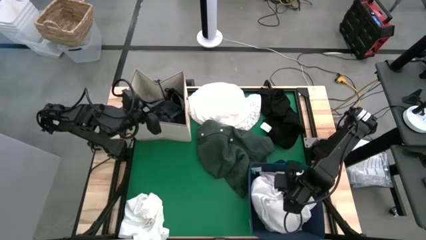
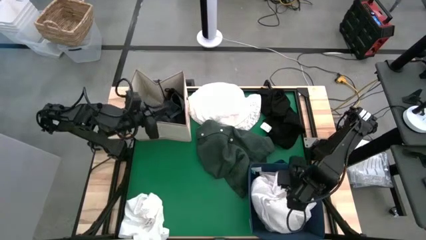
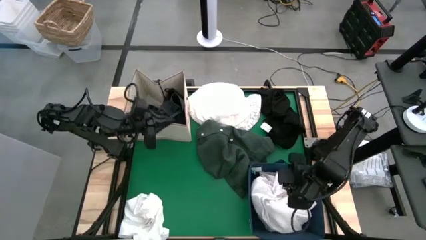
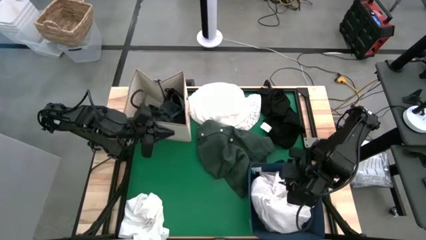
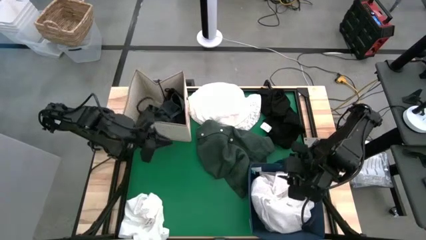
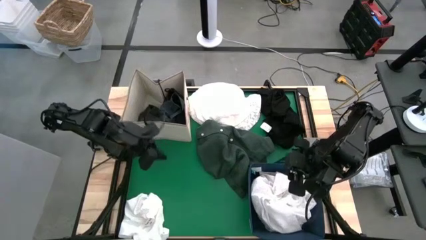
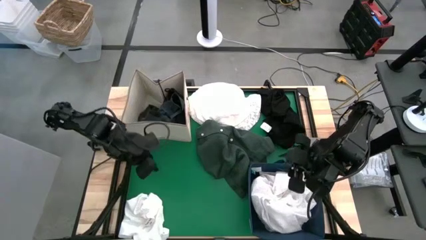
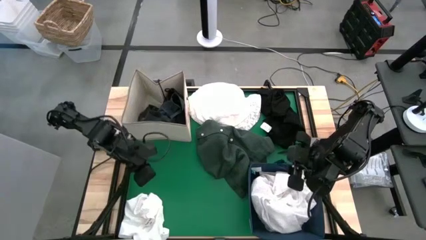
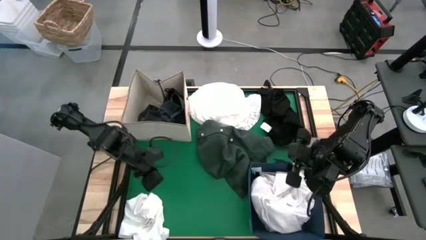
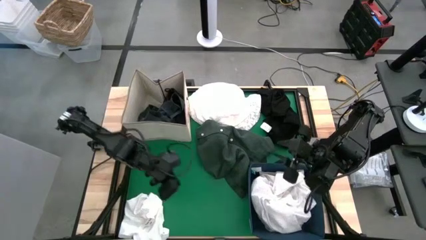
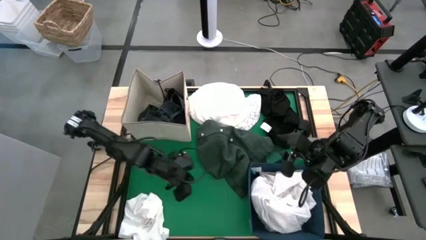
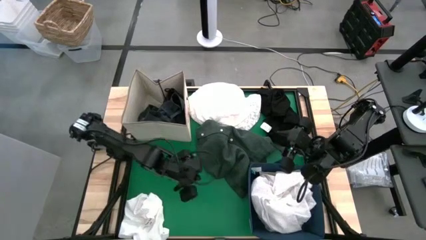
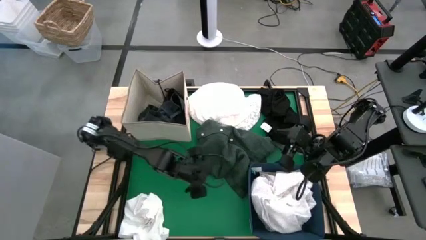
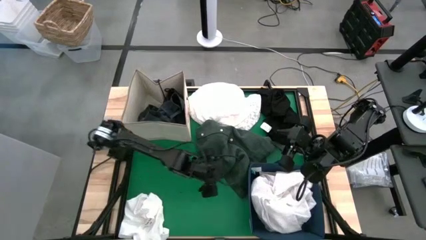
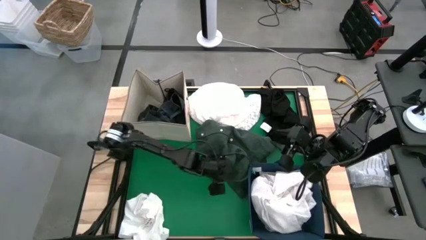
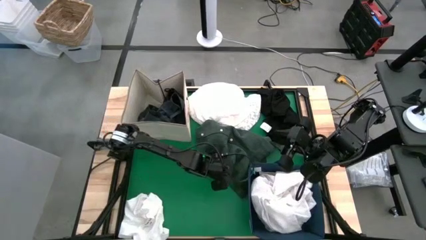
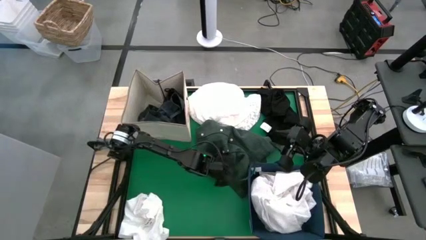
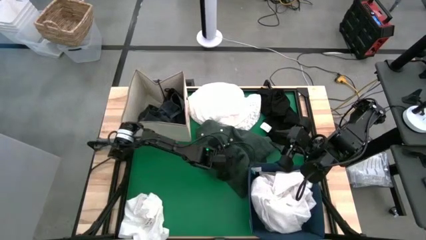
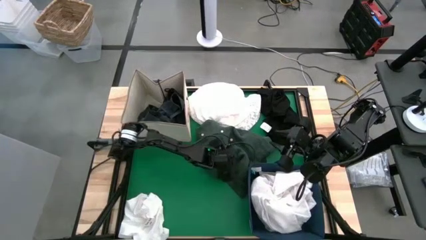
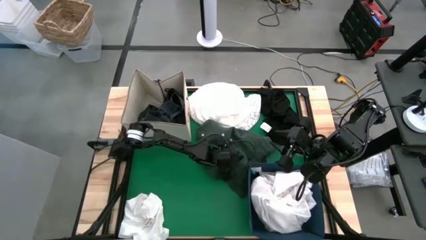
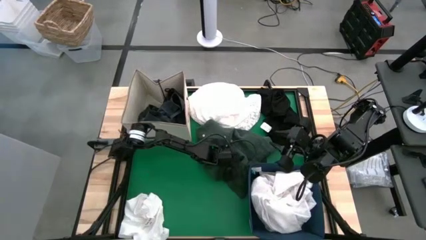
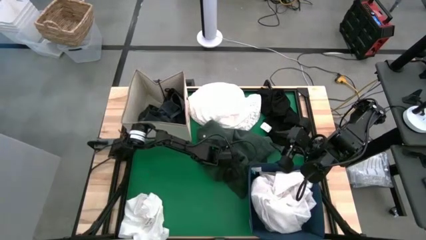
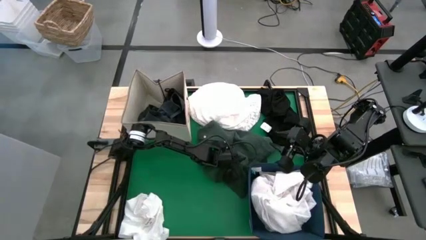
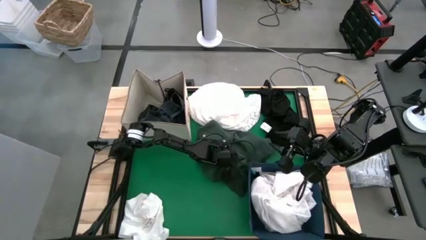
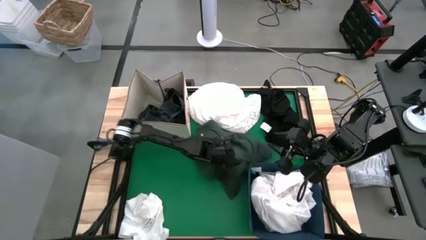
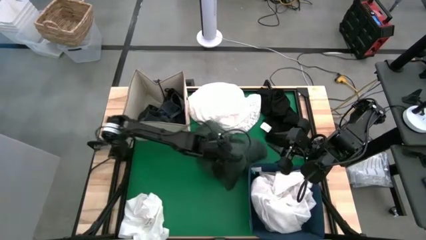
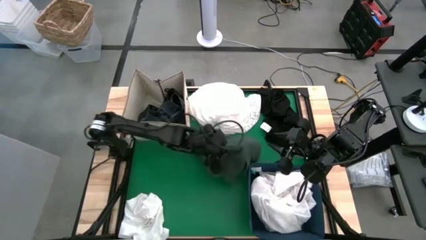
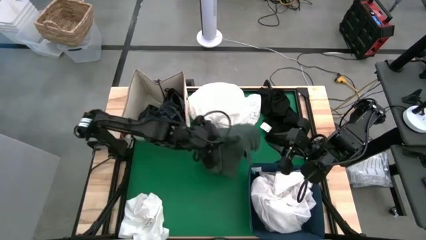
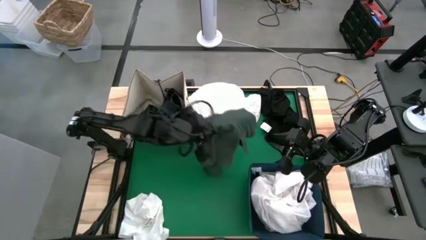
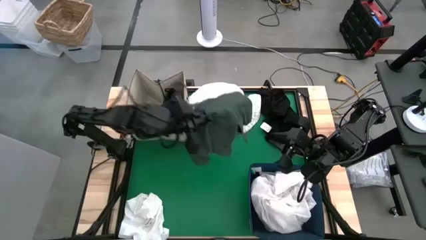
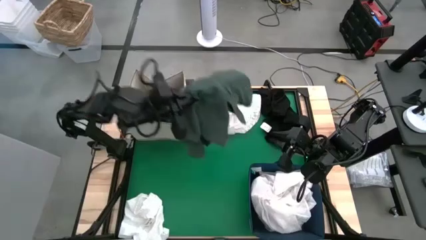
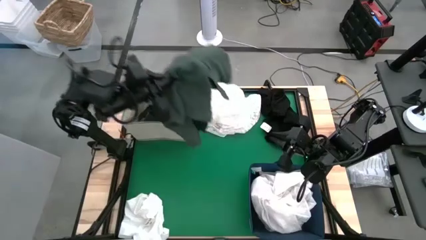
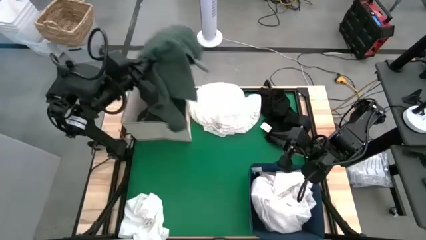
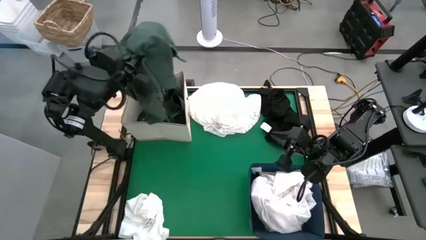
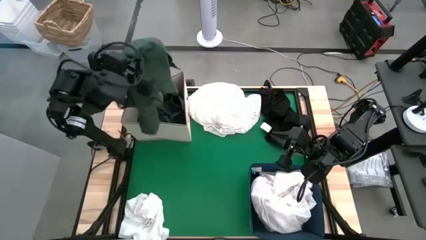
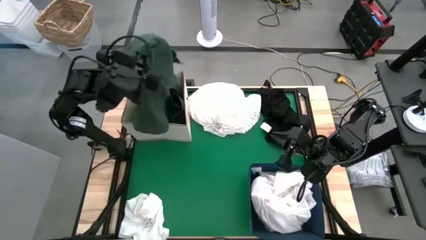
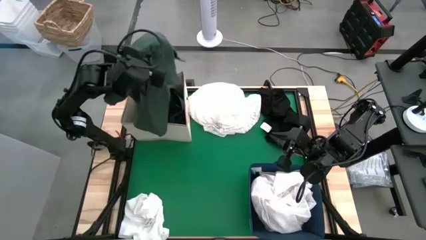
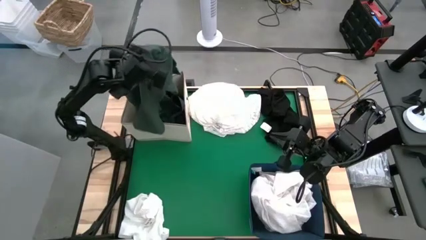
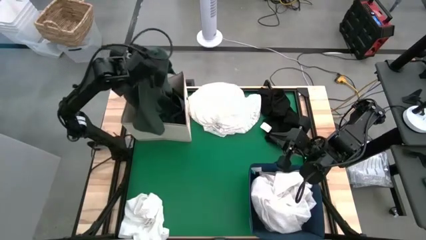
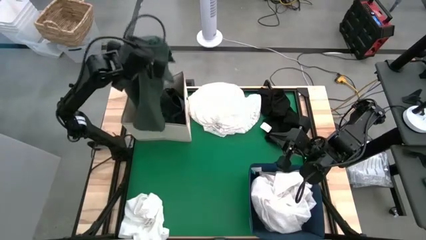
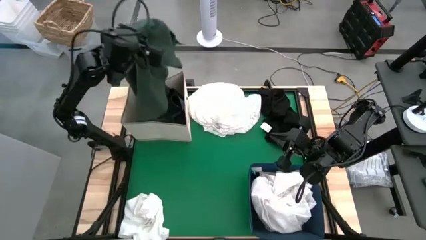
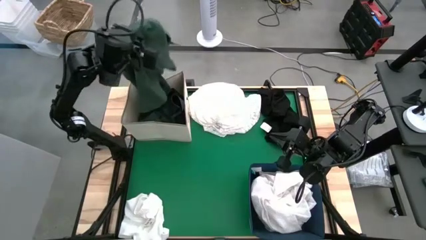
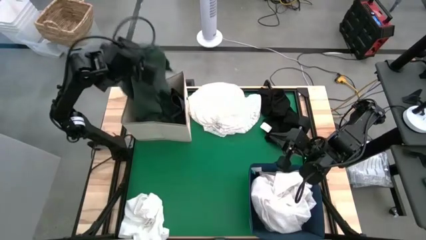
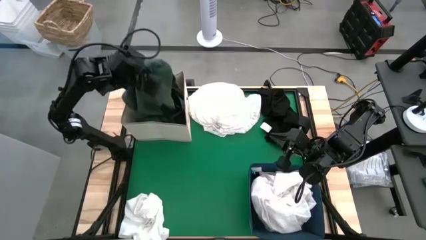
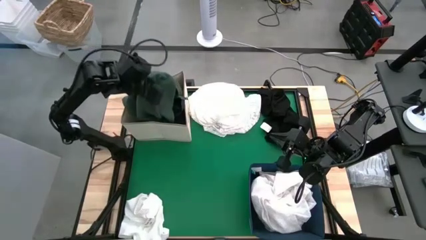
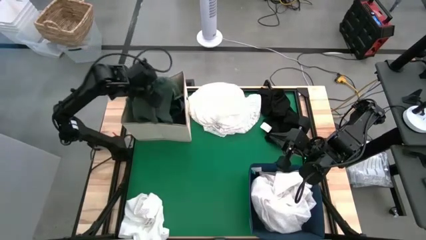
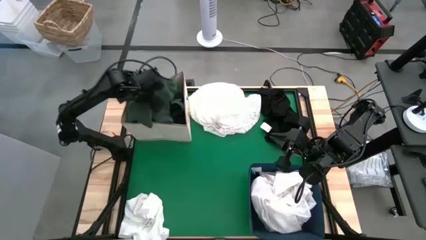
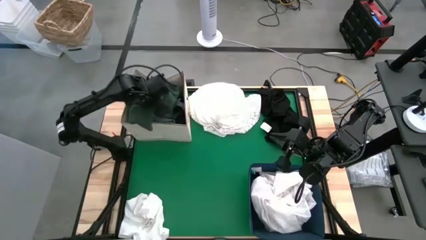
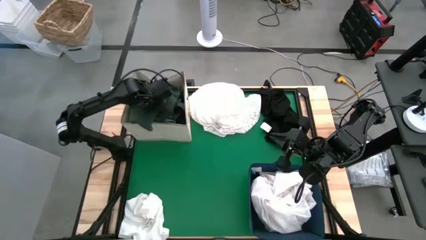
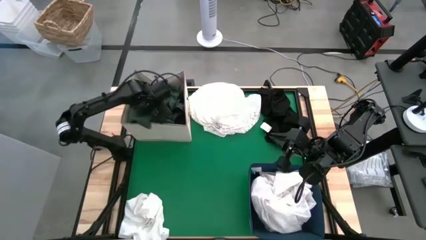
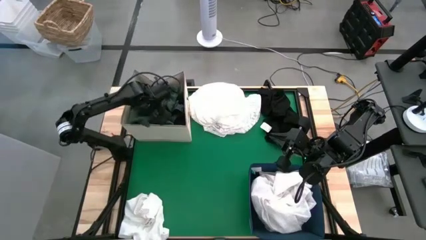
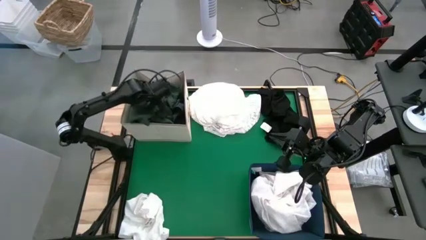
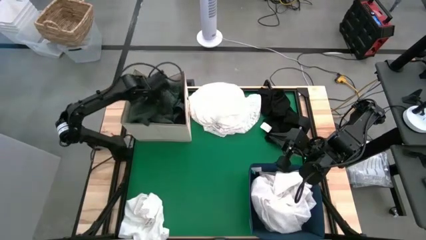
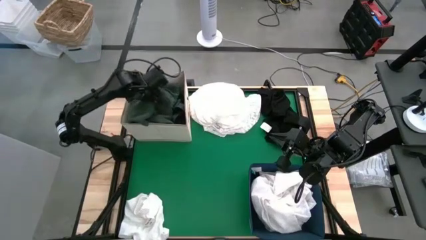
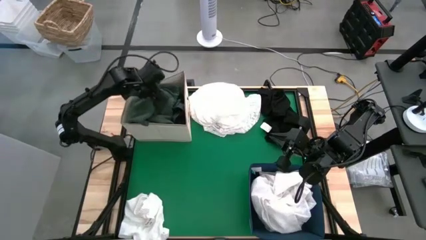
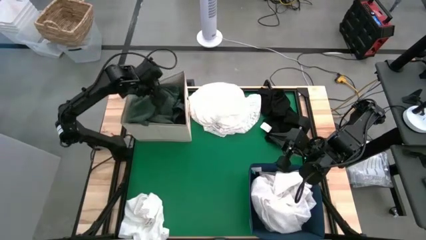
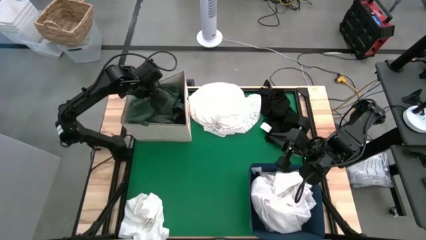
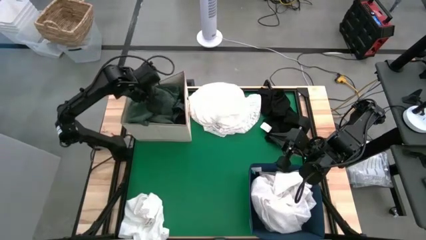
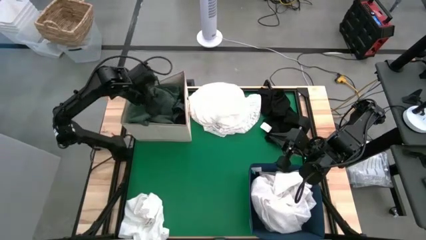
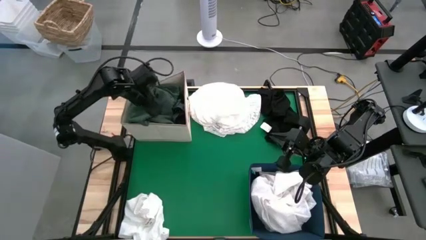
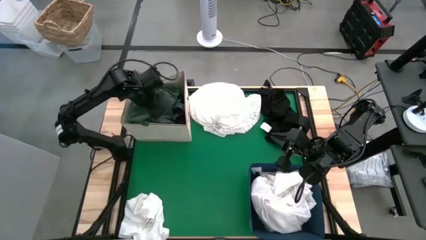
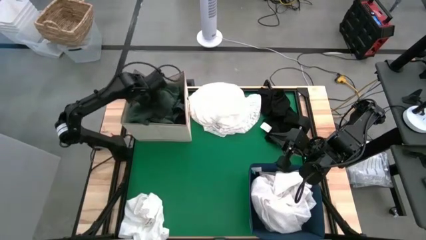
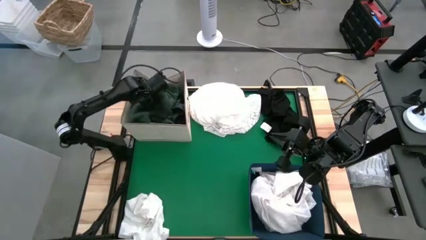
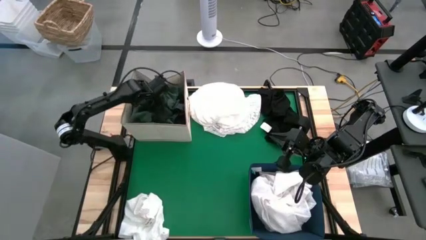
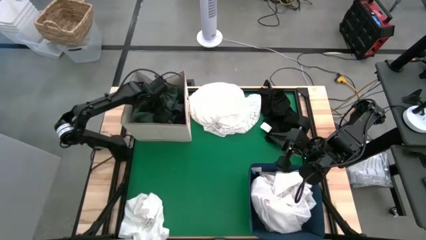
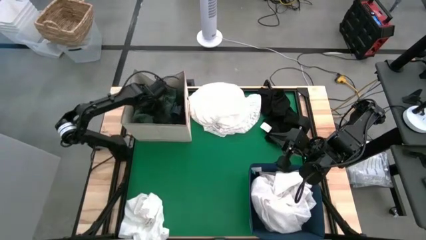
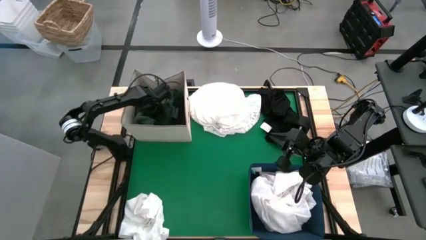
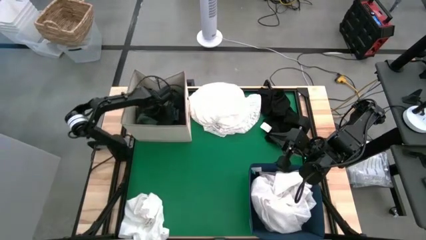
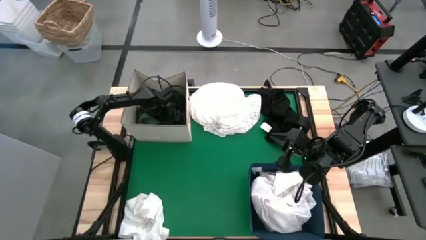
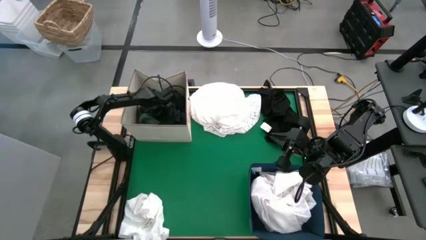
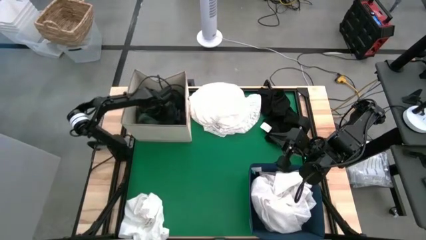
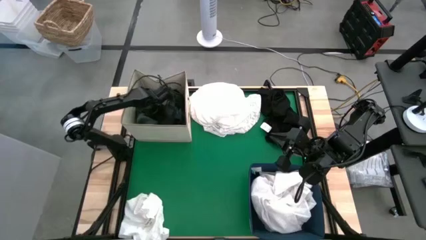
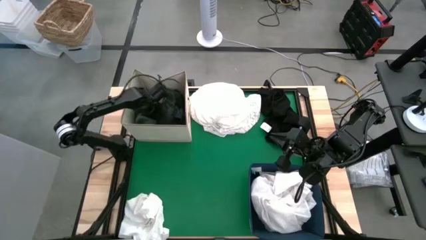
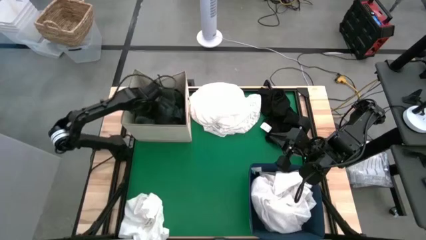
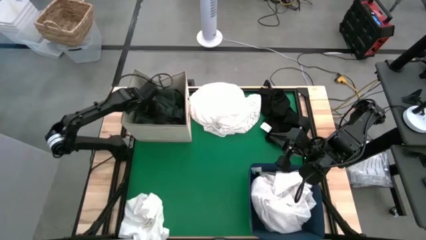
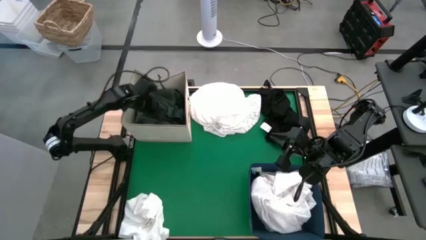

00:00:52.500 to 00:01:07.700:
Put the green cloth into the white bin
